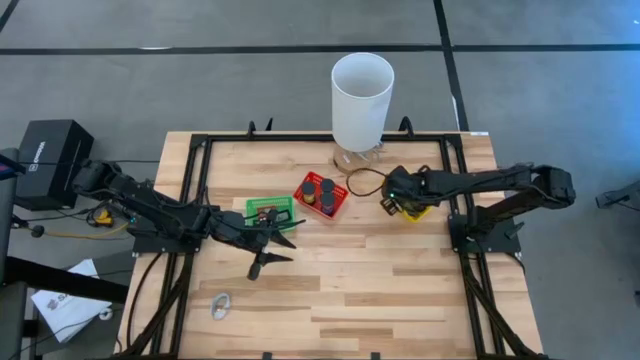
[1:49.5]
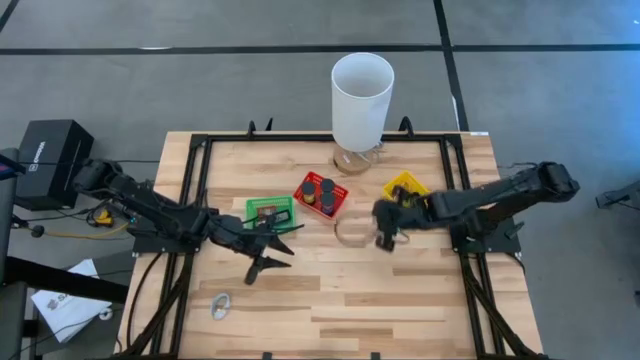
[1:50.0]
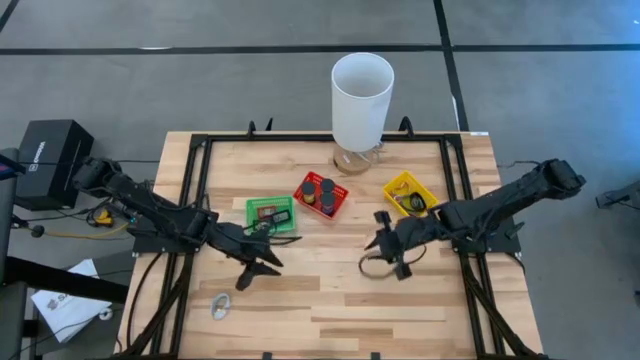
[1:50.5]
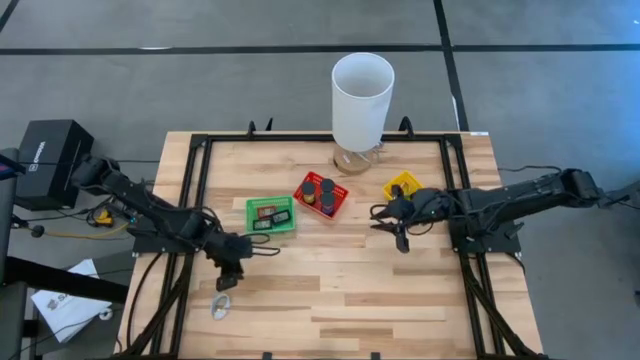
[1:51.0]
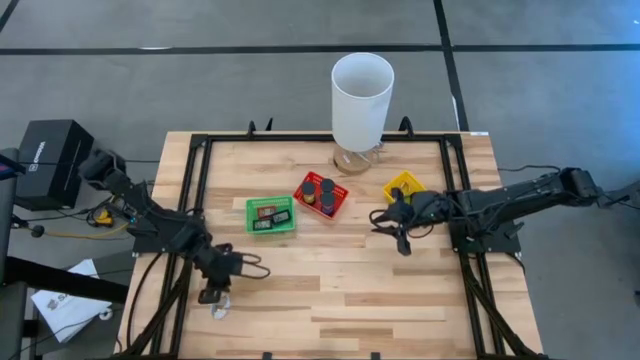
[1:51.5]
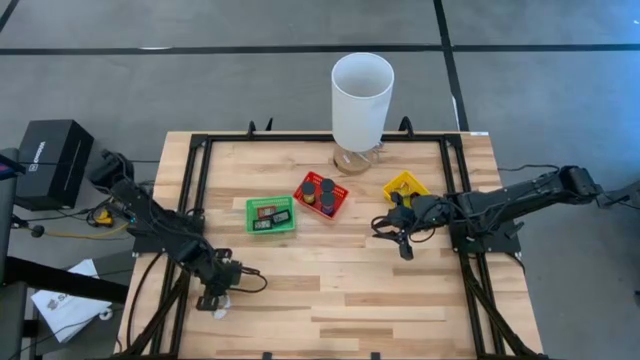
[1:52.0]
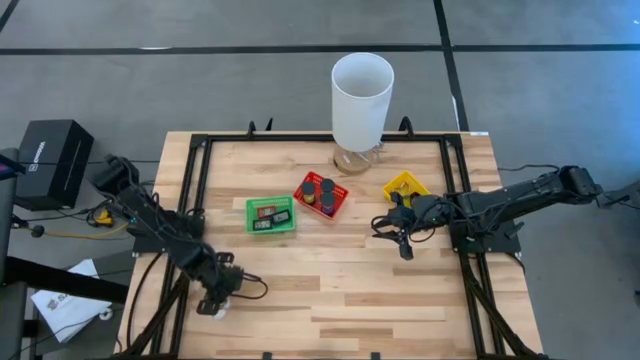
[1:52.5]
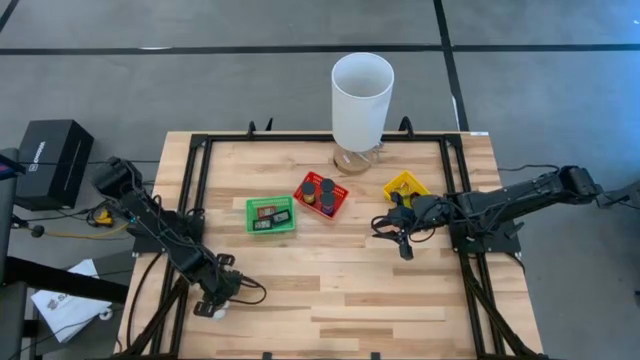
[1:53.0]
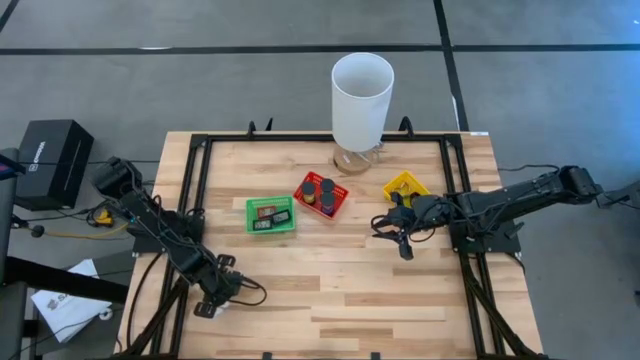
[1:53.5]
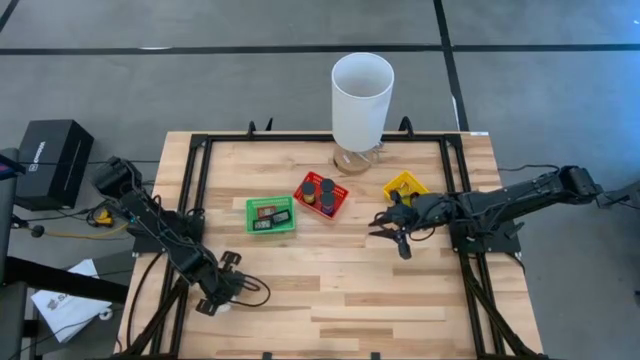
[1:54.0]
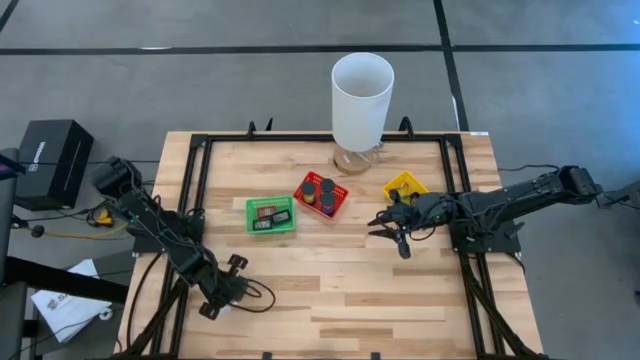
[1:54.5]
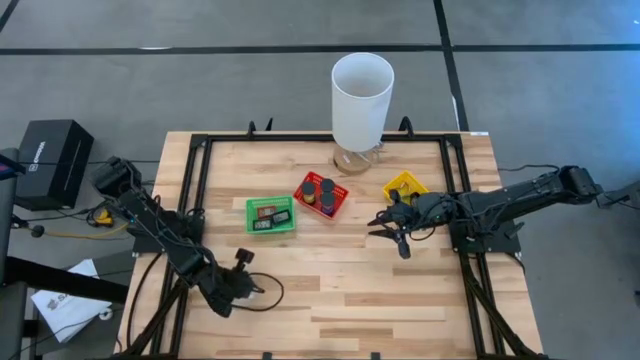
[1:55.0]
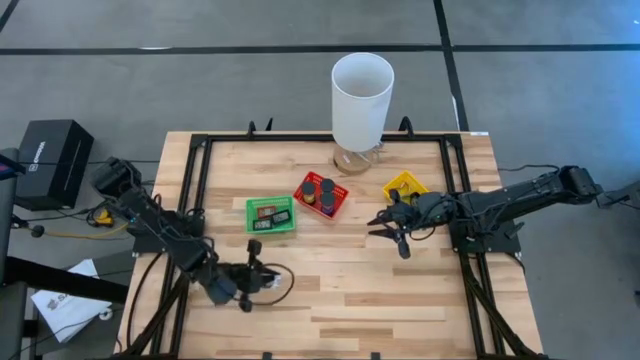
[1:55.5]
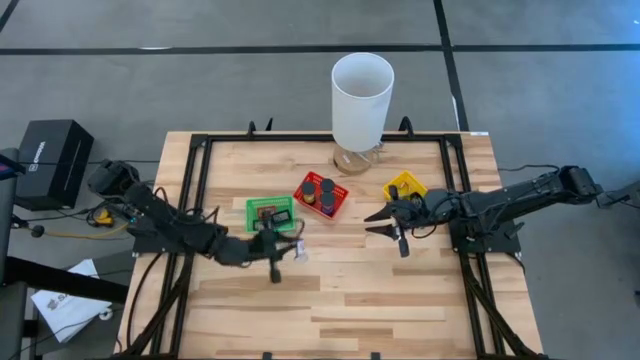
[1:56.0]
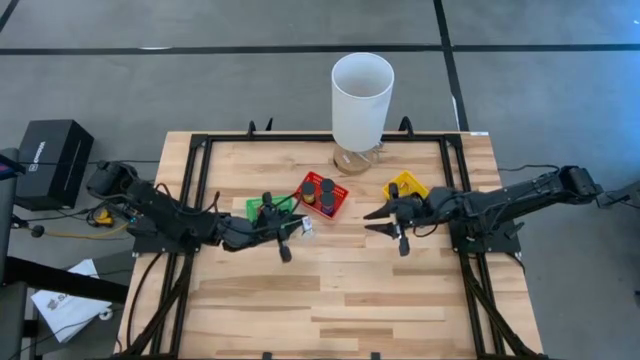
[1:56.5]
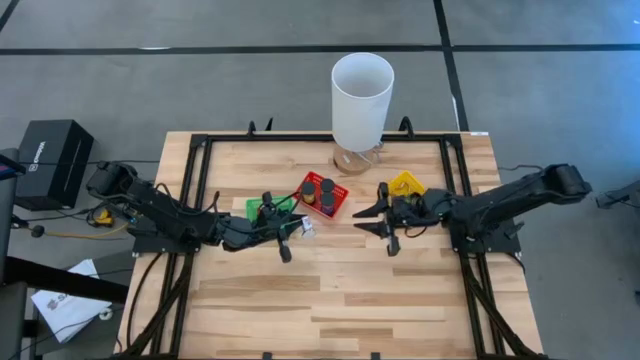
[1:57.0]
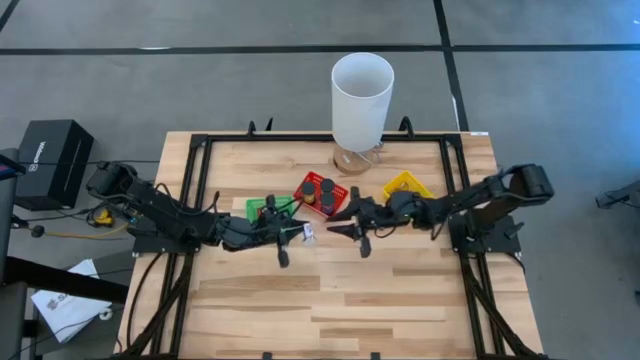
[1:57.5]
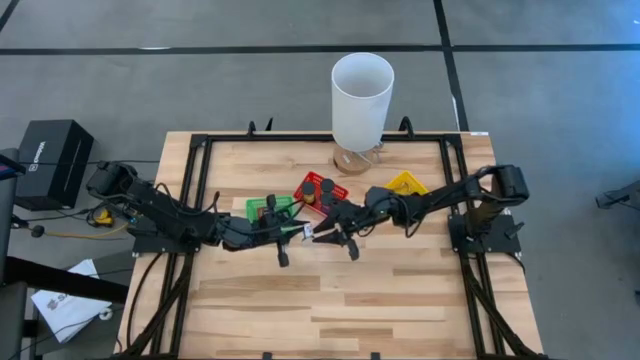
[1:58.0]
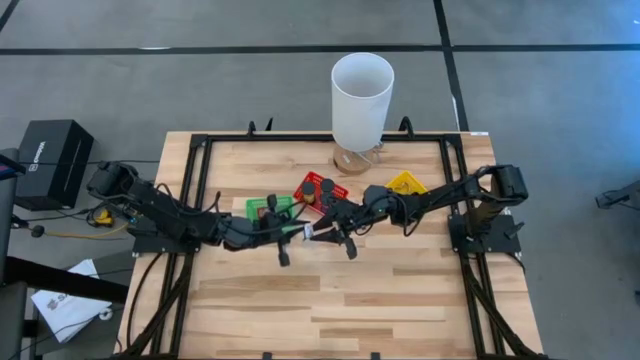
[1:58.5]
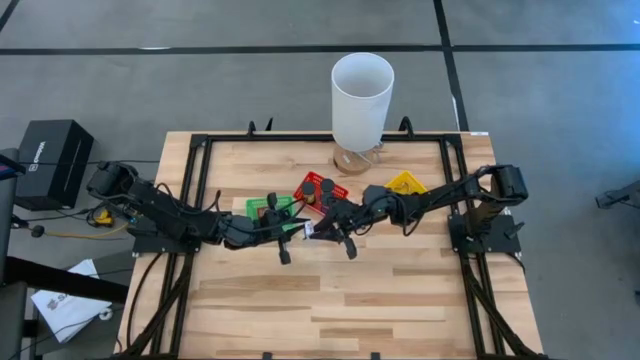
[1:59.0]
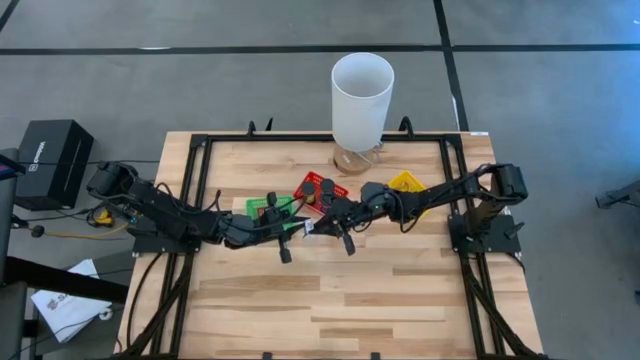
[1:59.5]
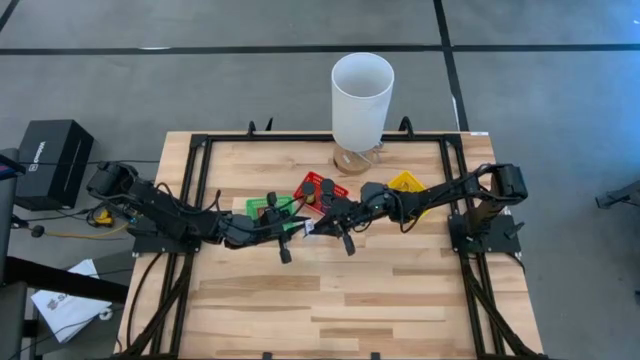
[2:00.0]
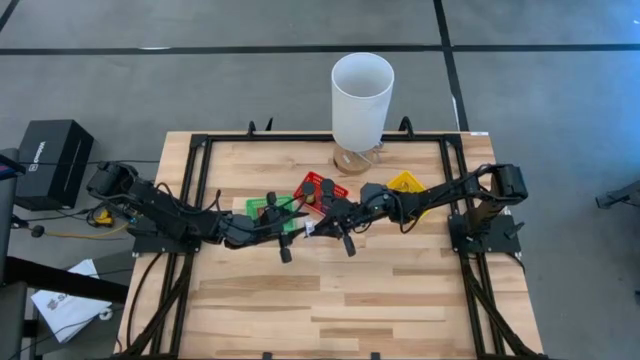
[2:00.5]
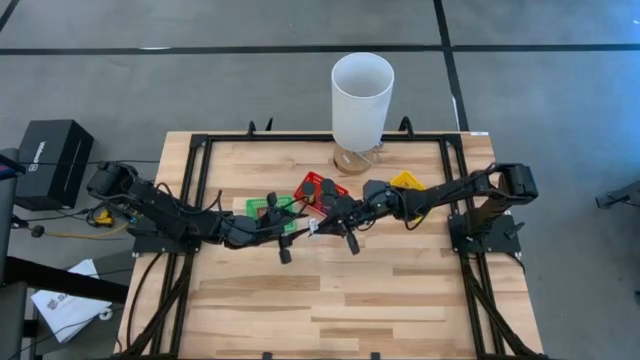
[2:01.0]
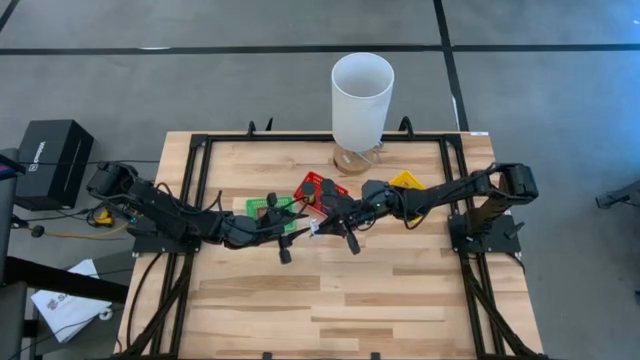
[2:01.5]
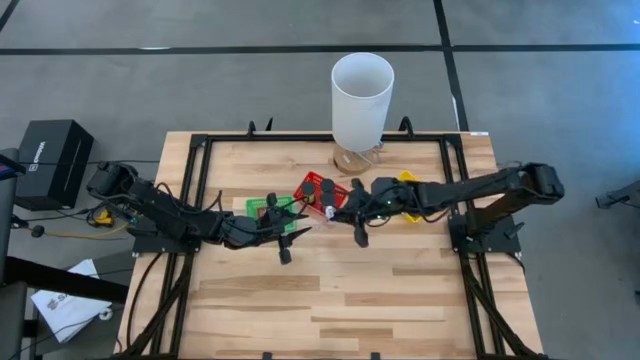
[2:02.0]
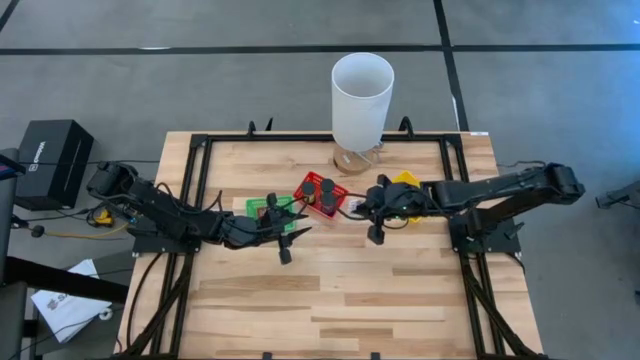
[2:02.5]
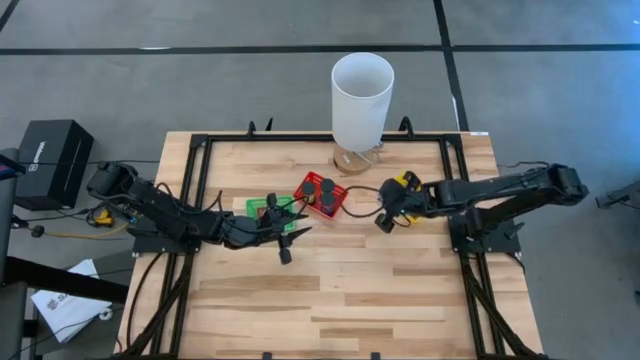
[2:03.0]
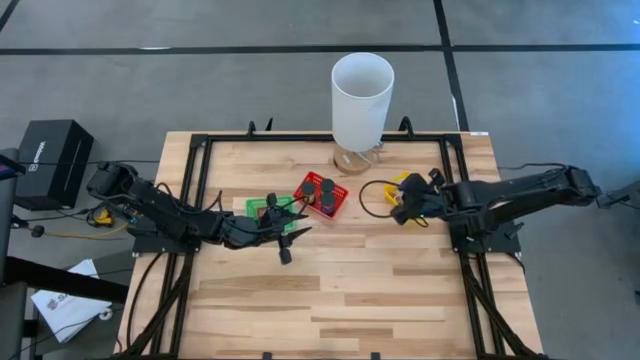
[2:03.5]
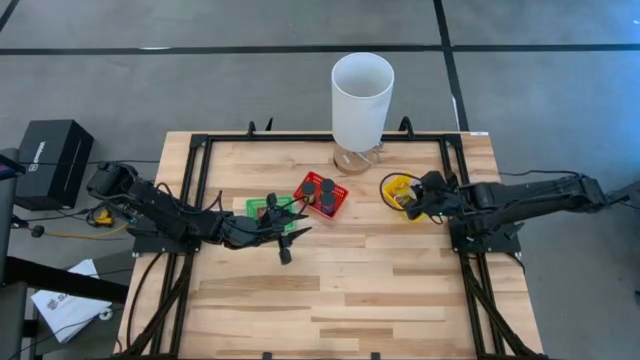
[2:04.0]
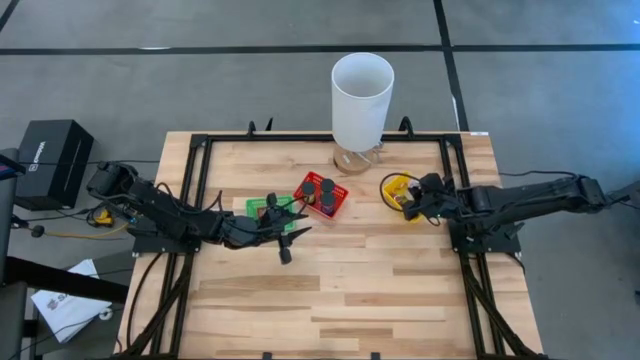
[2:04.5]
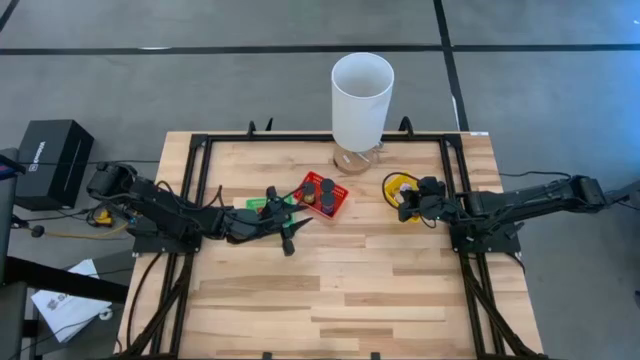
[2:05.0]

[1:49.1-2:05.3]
Task: Pick & Place Office items
Put the white watch into the yellow bin

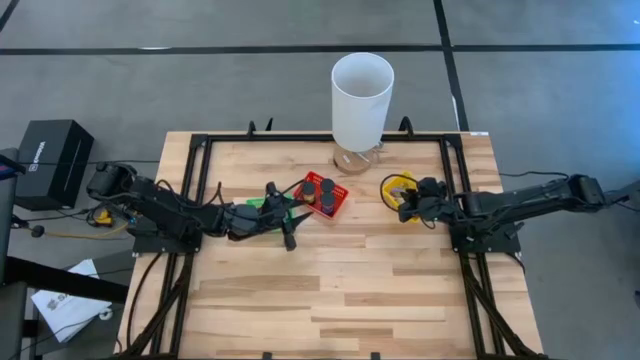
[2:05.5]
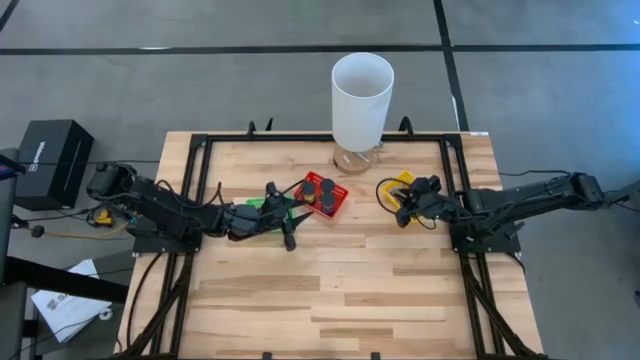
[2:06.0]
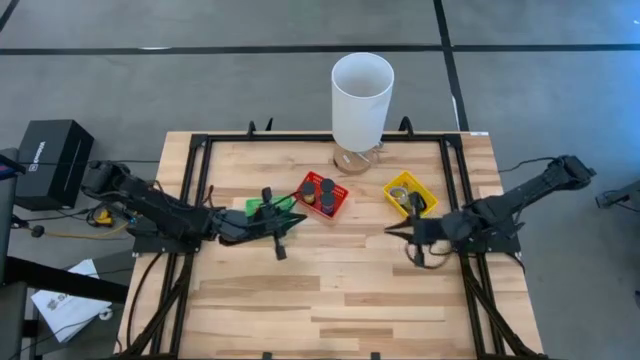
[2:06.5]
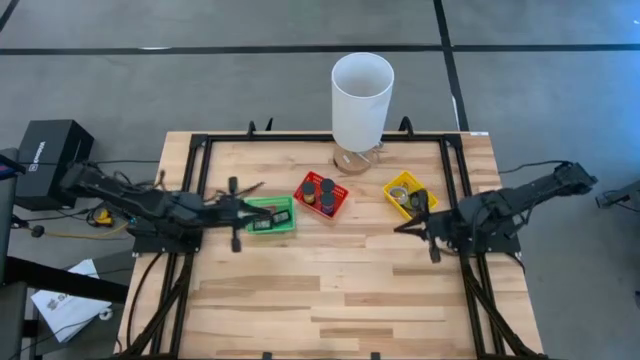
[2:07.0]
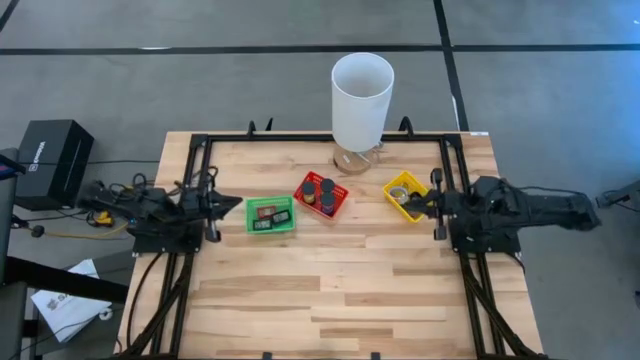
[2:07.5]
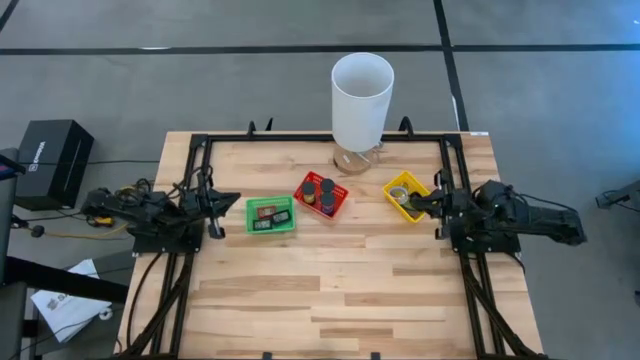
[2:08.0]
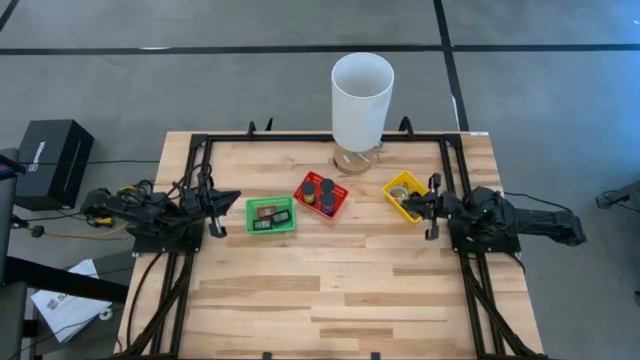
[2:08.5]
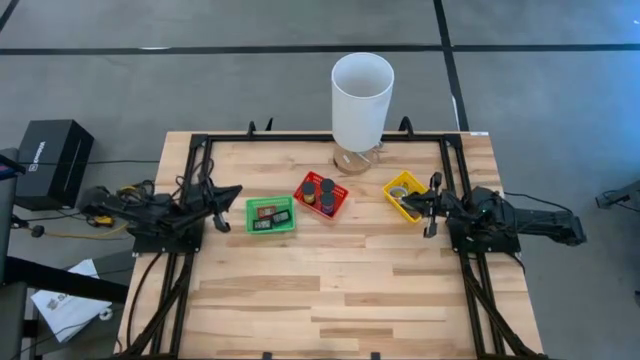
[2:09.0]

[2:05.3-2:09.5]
Return to Home Position
